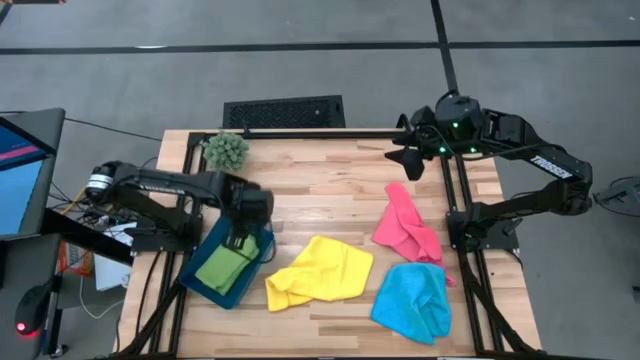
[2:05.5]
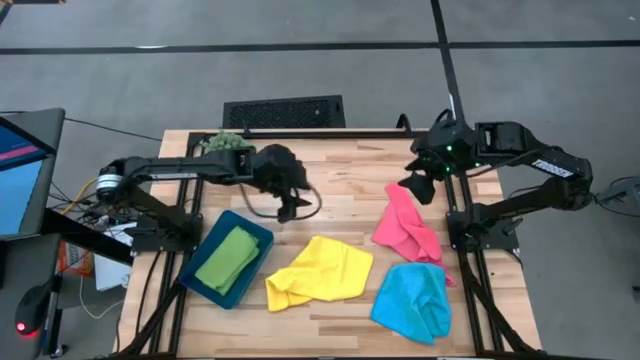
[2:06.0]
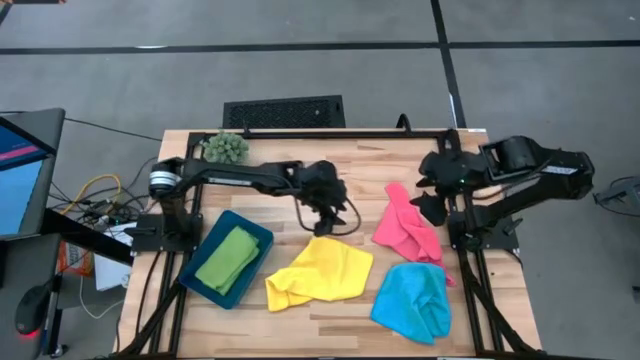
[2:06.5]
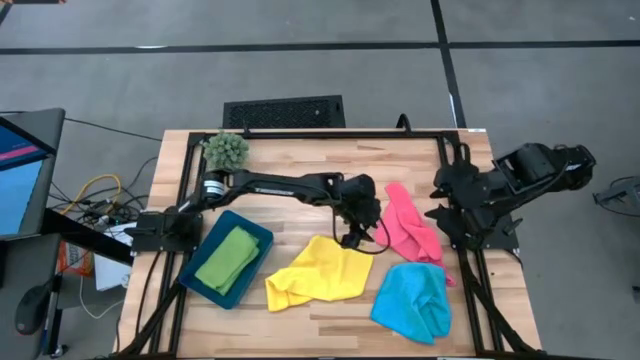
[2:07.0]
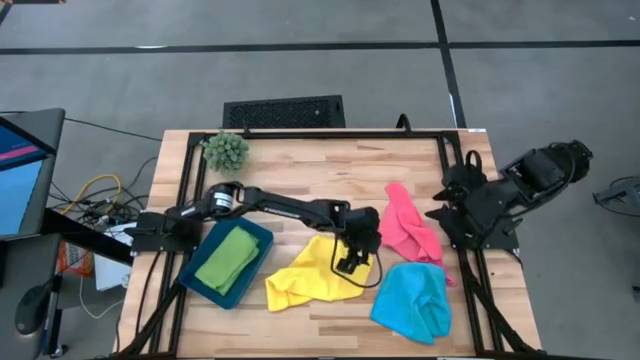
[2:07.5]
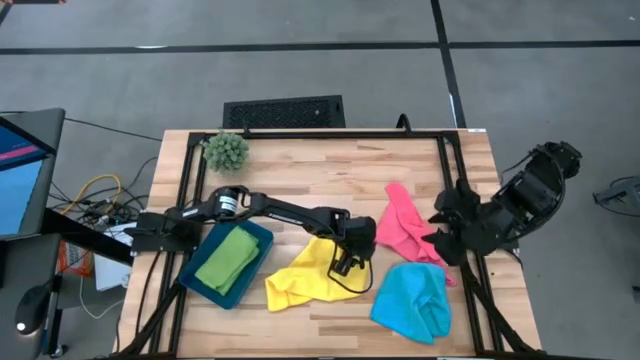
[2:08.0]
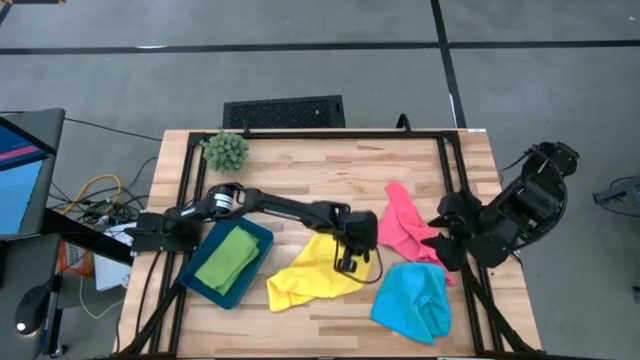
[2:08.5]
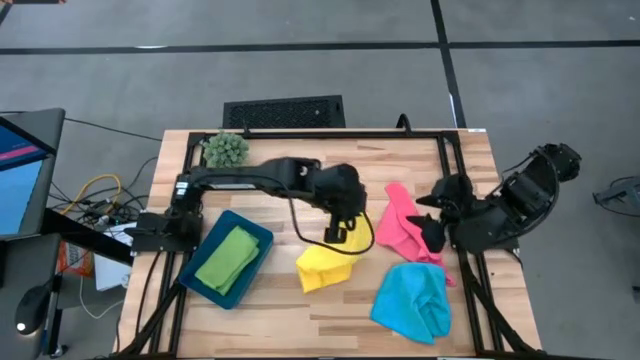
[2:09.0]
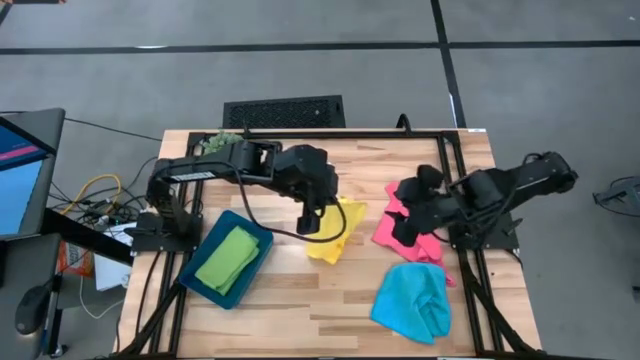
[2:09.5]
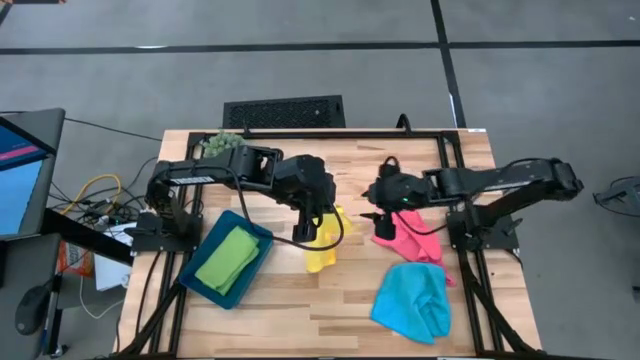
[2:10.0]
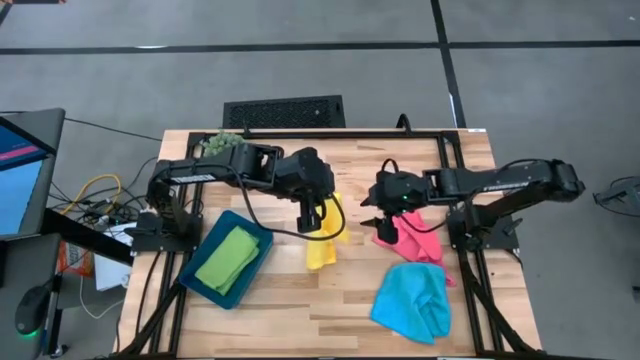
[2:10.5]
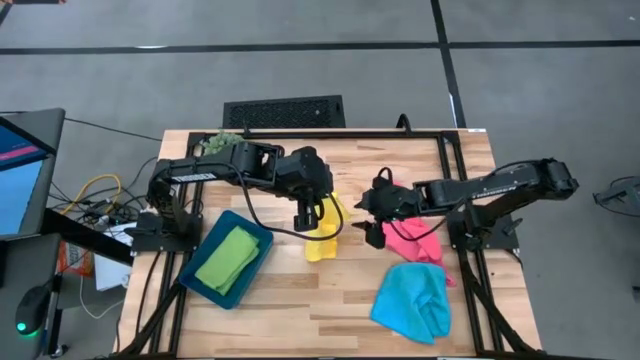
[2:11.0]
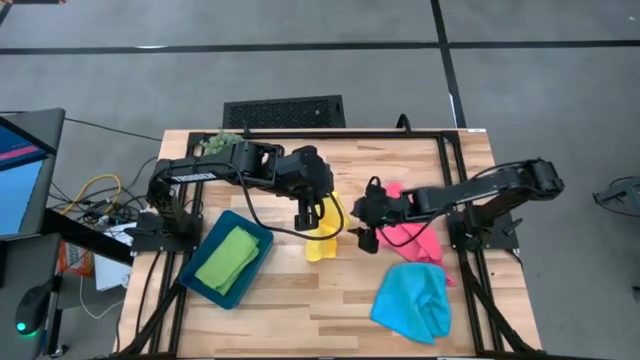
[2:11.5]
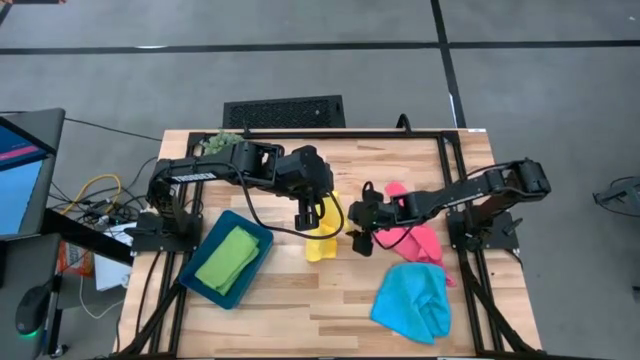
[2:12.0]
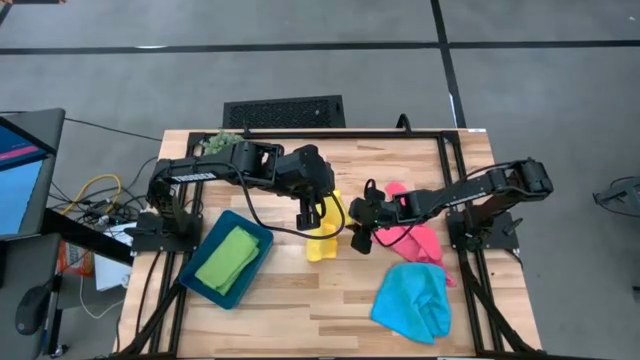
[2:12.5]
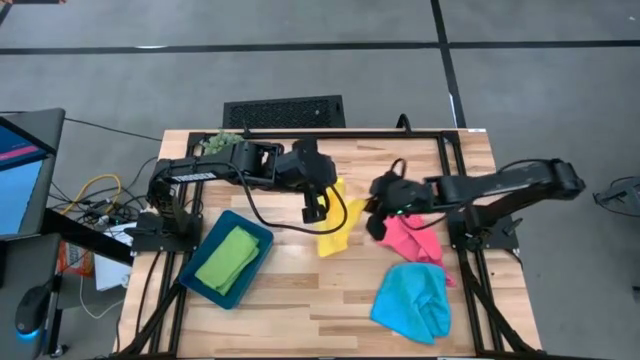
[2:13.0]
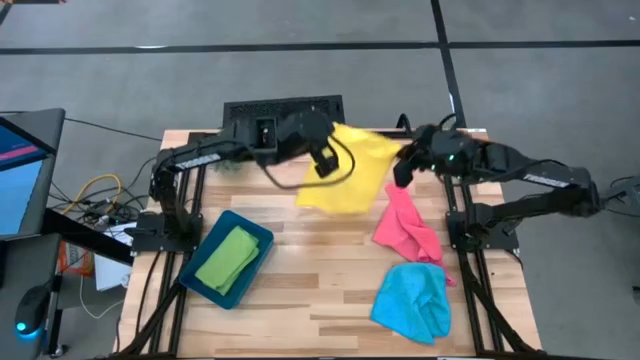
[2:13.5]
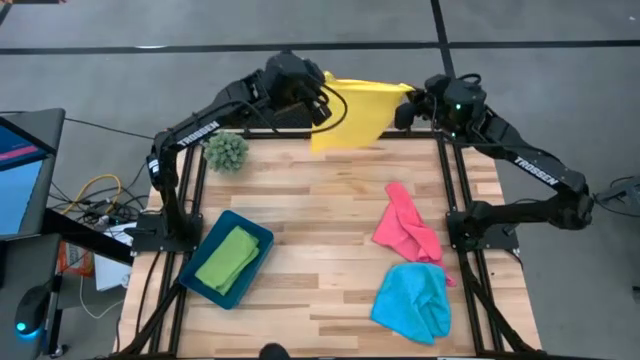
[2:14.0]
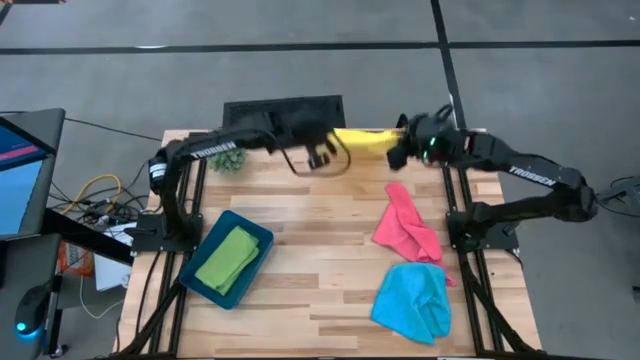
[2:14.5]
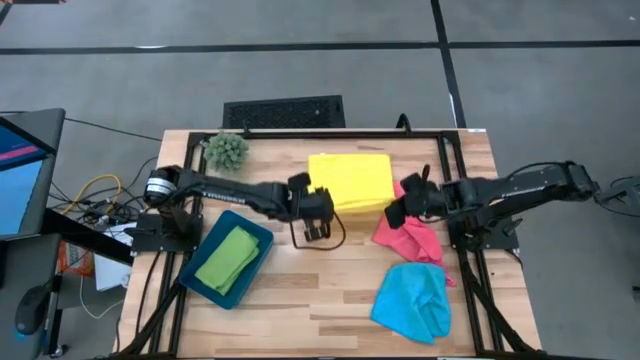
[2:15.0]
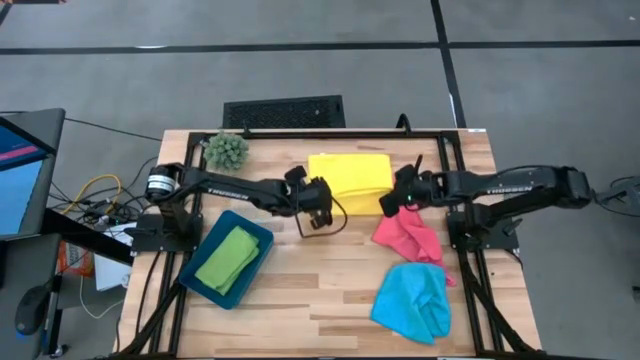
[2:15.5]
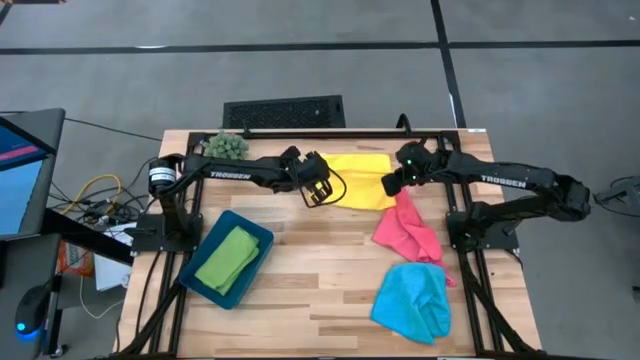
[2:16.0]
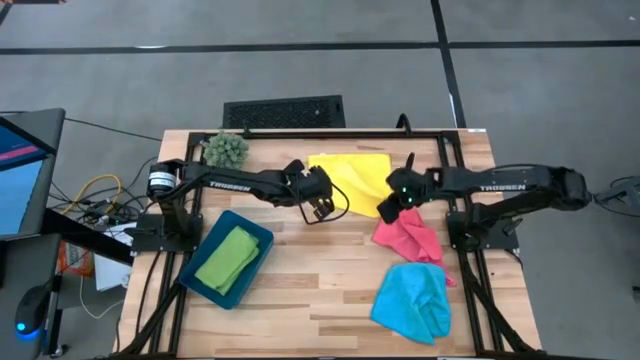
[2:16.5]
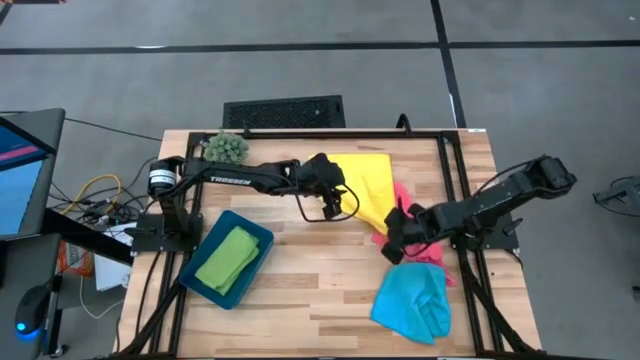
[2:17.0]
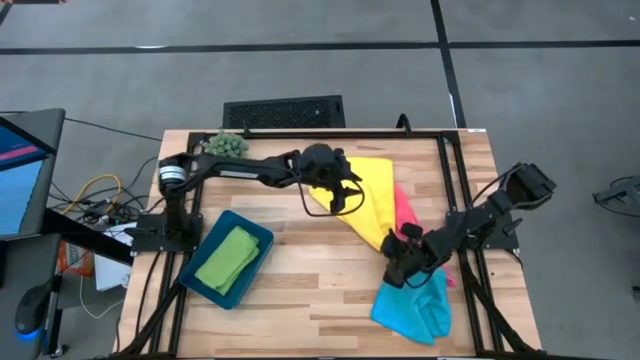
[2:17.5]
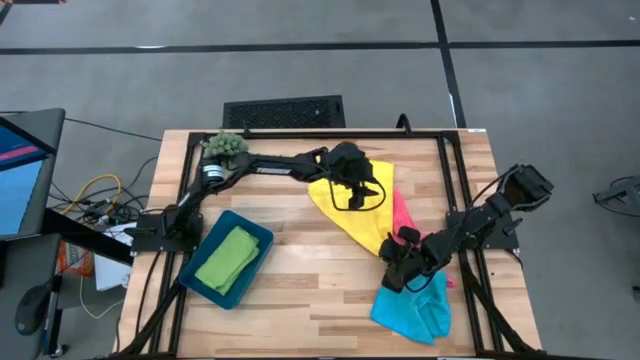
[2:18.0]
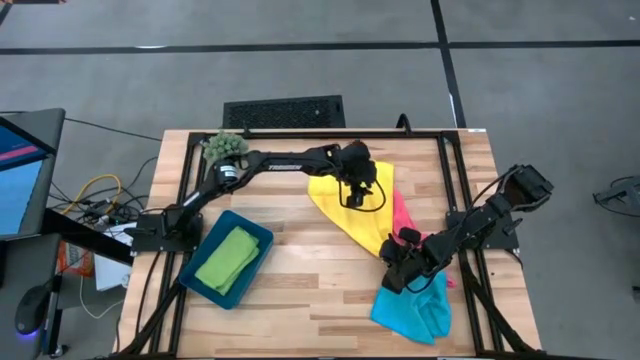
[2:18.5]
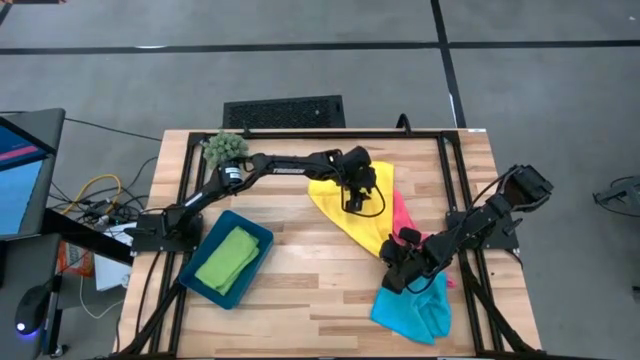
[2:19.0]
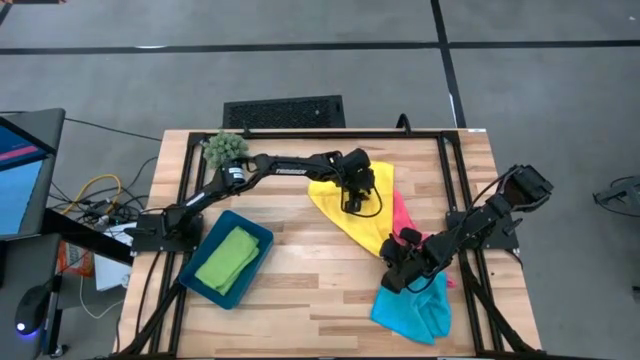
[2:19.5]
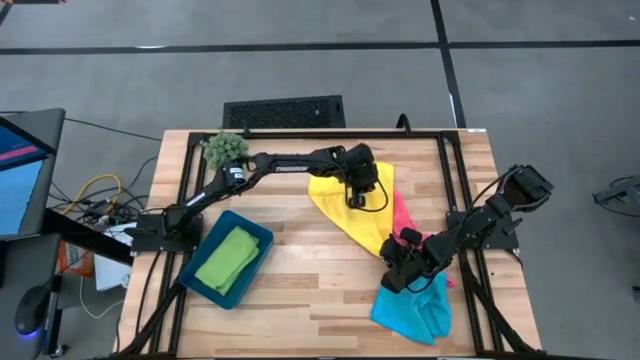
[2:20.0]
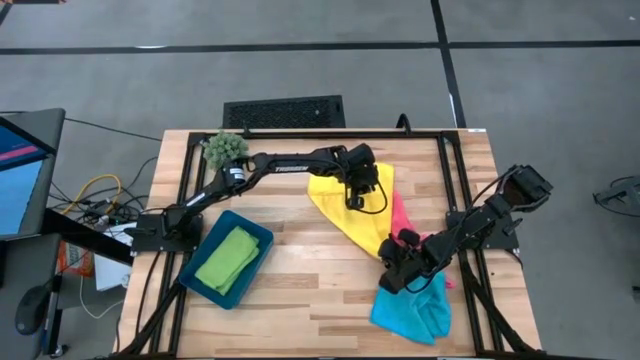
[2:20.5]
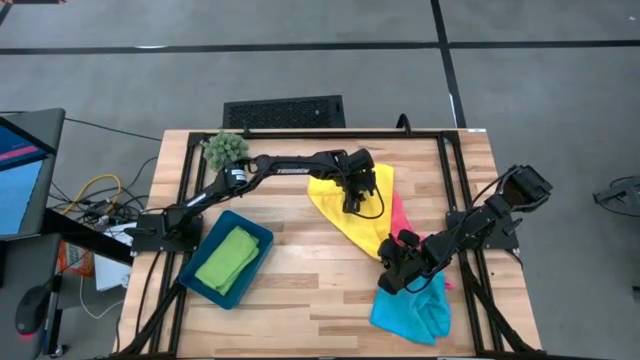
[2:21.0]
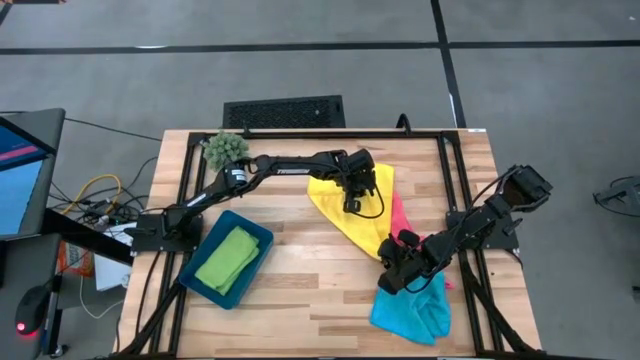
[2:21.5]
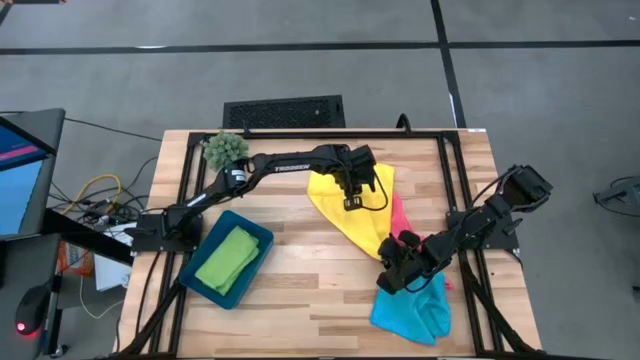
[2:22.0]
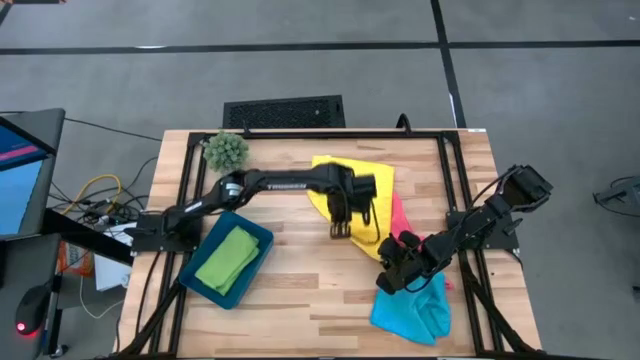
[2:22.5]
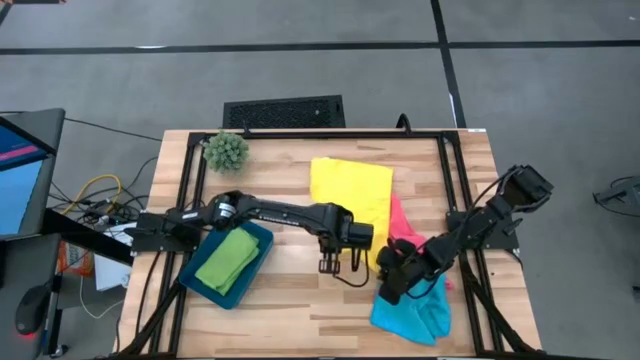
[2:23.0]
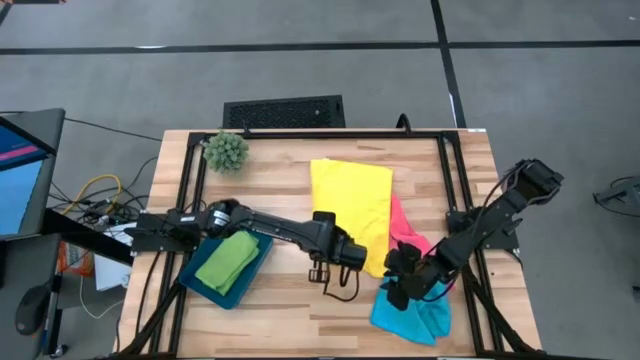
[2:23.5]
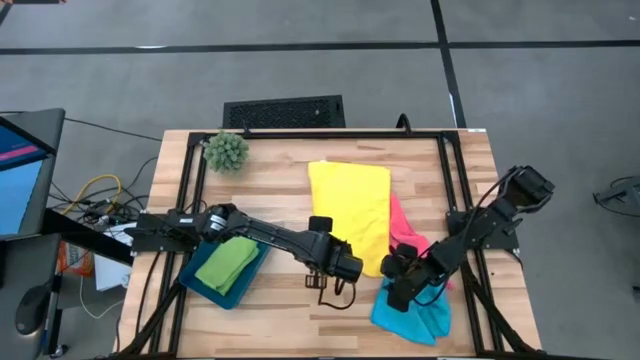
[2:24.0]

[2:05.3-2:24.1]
Task: Fold microfiber towels
Fold the yellow microfiber towel

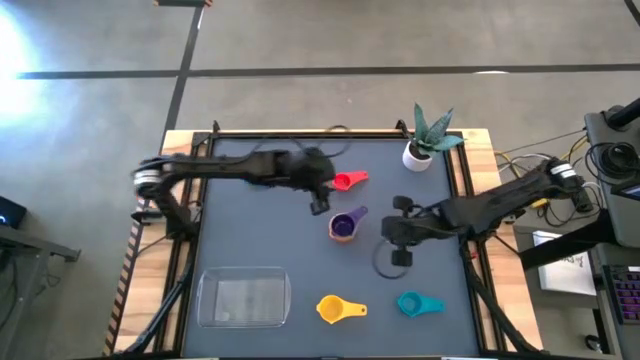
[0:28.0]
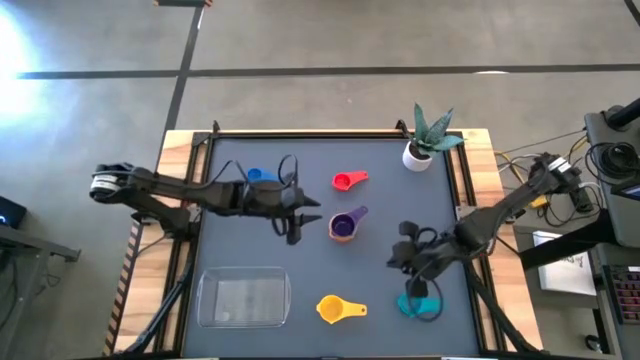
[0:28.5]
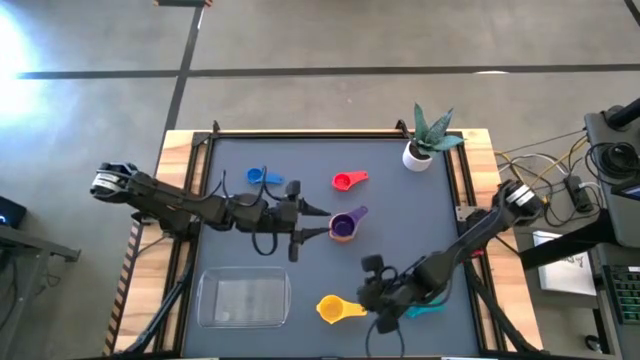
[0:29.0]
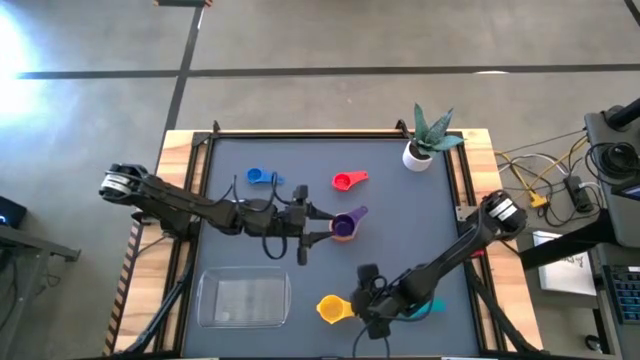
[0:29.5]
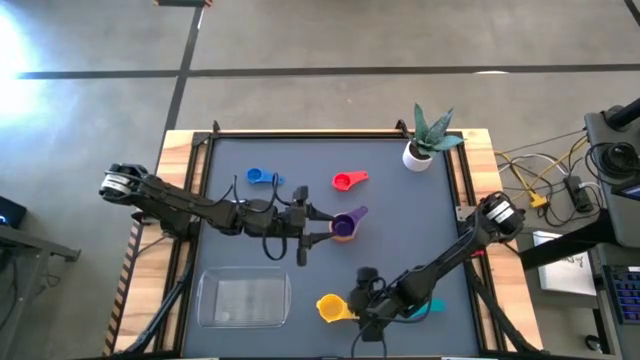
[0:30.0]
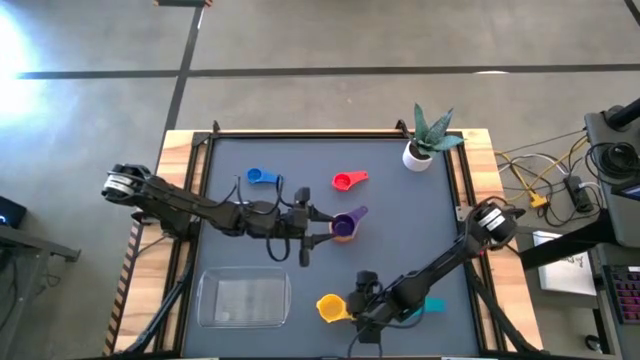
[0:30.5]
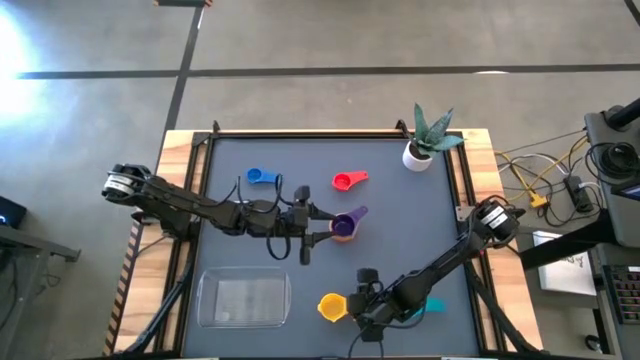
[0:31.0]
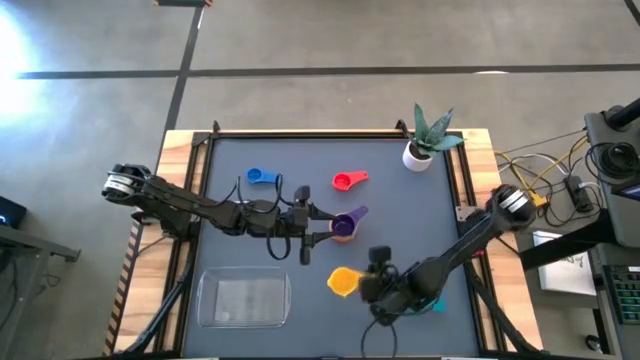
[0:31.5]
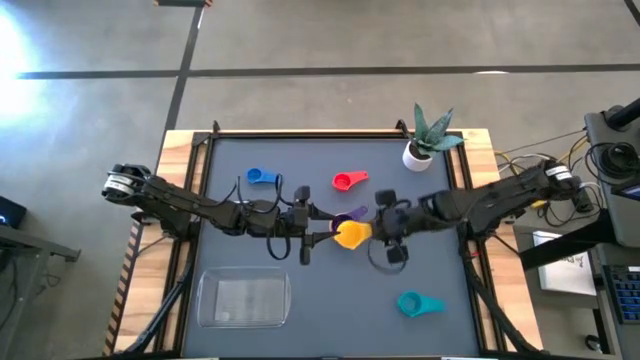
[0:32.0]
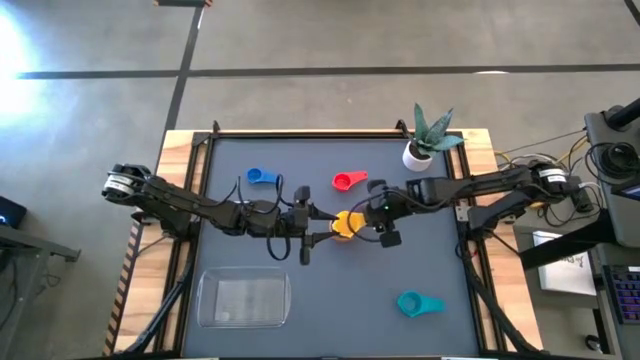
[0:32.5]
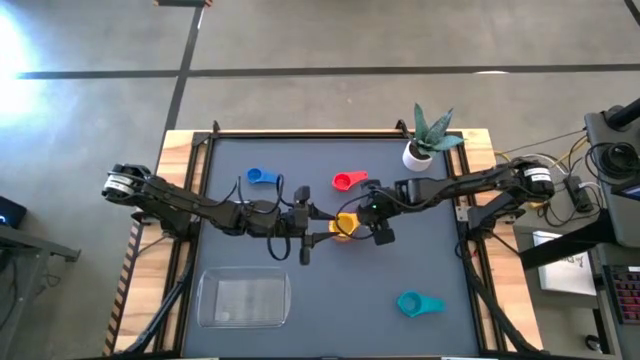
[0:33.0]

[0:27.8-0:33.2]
Task: Nest measuring cups in basket
Stack the yellow measuring cup on top of the violet measuring cup
